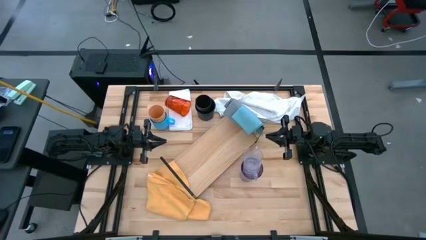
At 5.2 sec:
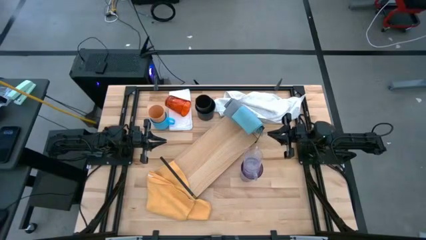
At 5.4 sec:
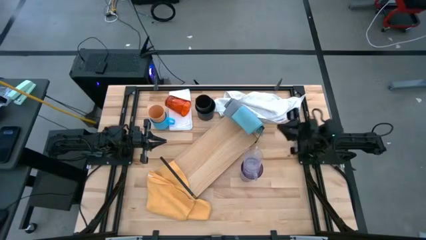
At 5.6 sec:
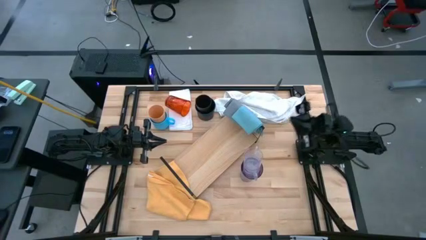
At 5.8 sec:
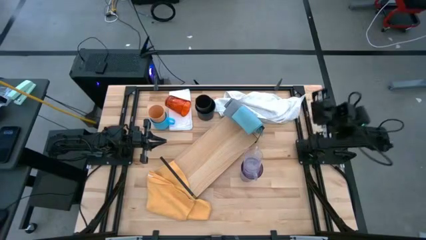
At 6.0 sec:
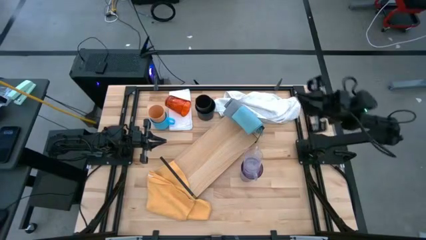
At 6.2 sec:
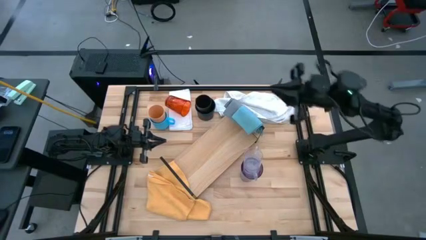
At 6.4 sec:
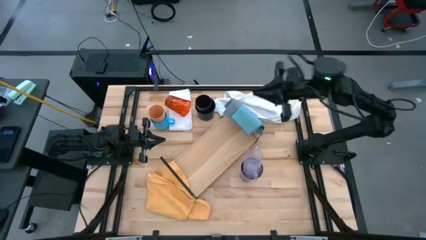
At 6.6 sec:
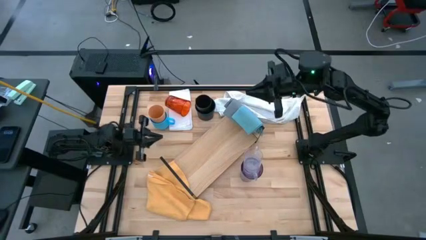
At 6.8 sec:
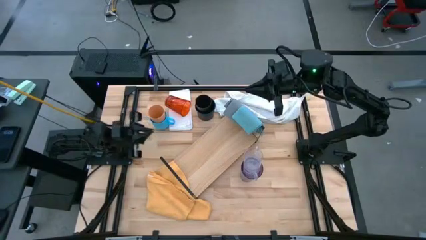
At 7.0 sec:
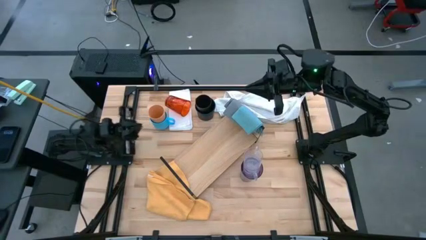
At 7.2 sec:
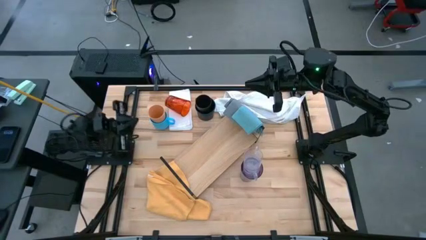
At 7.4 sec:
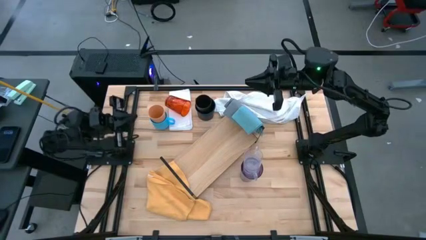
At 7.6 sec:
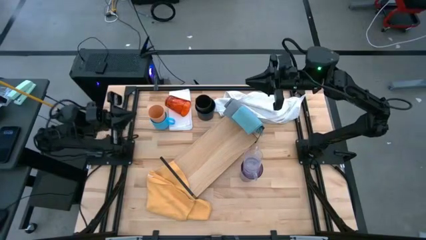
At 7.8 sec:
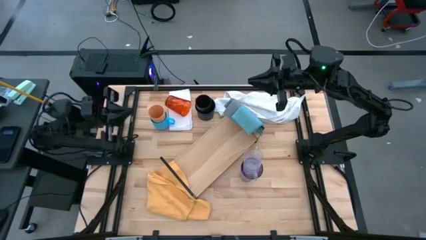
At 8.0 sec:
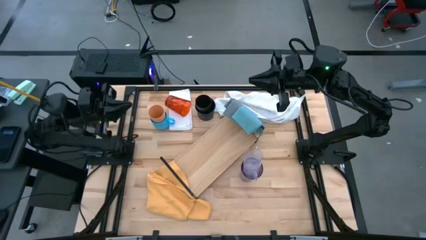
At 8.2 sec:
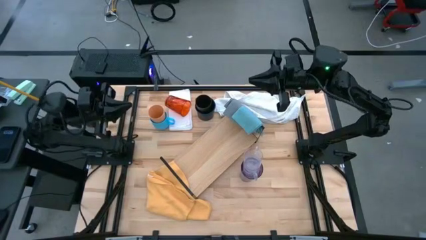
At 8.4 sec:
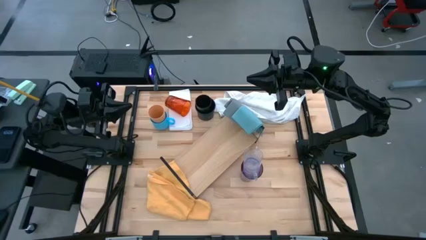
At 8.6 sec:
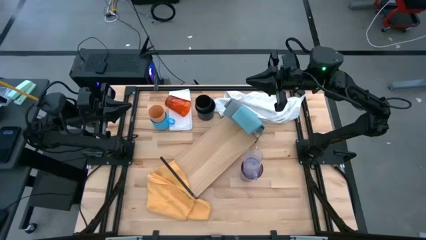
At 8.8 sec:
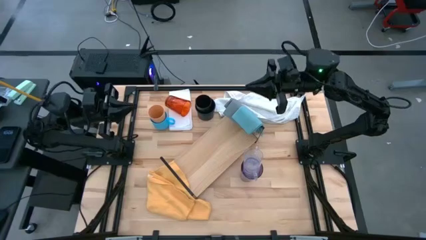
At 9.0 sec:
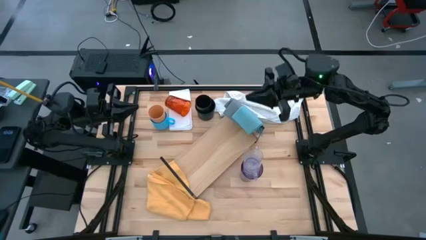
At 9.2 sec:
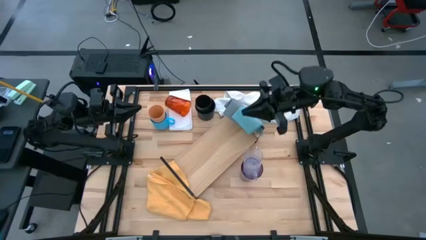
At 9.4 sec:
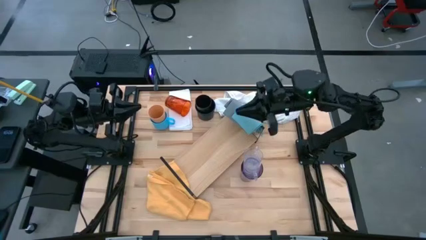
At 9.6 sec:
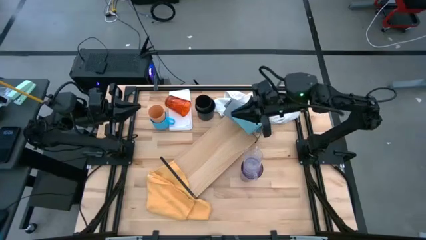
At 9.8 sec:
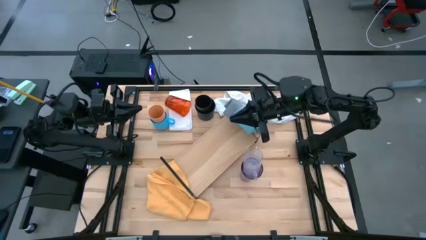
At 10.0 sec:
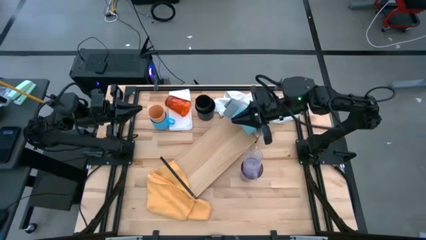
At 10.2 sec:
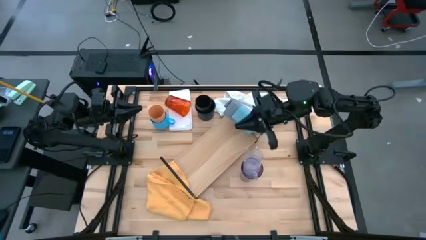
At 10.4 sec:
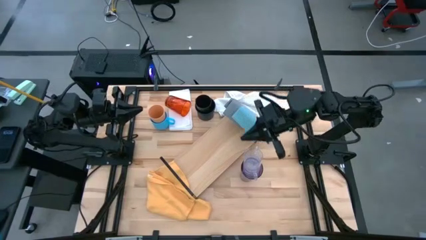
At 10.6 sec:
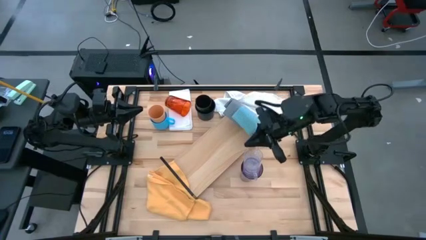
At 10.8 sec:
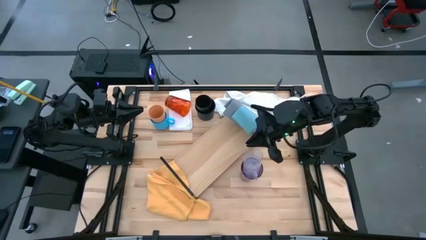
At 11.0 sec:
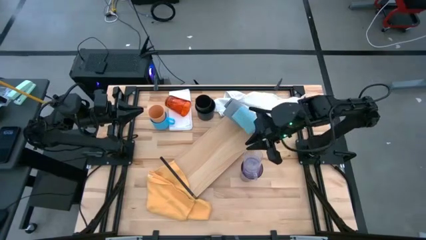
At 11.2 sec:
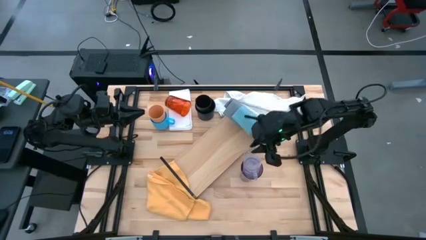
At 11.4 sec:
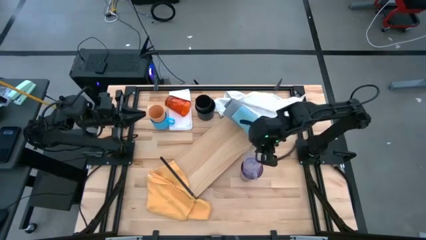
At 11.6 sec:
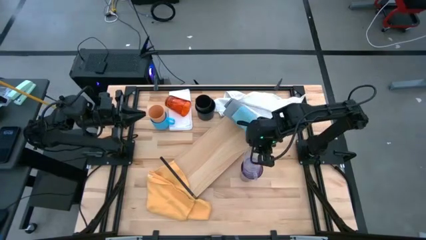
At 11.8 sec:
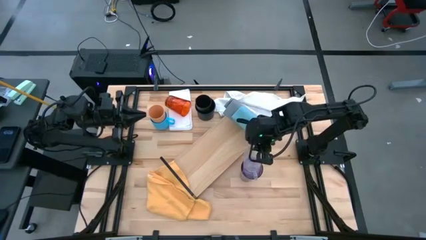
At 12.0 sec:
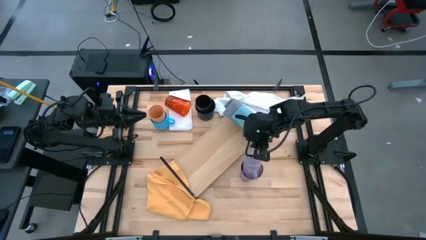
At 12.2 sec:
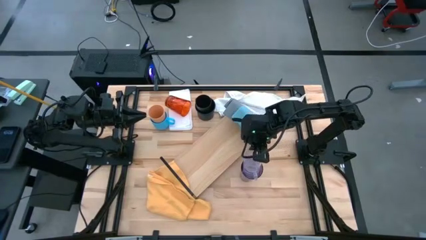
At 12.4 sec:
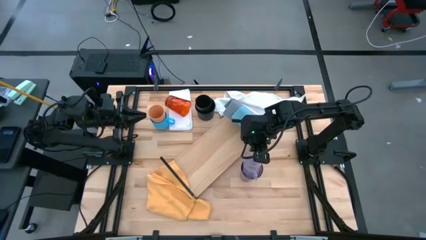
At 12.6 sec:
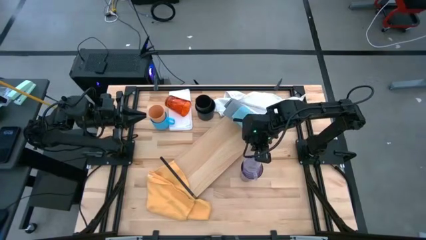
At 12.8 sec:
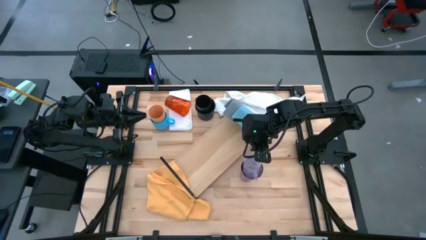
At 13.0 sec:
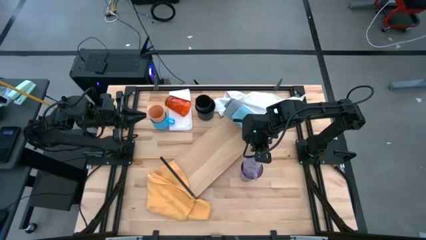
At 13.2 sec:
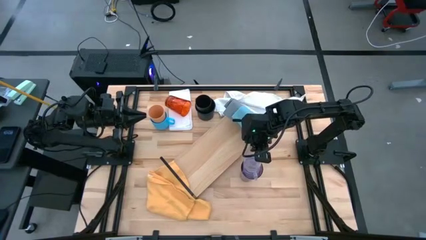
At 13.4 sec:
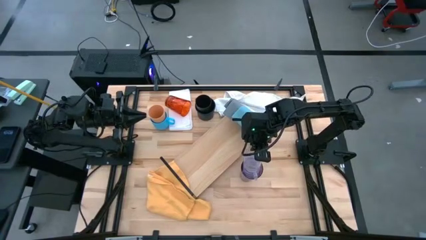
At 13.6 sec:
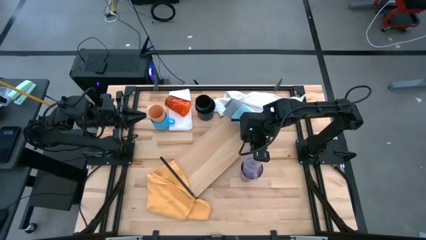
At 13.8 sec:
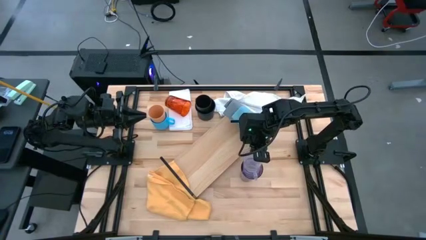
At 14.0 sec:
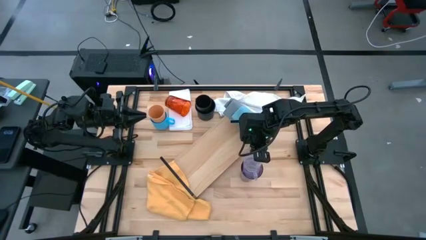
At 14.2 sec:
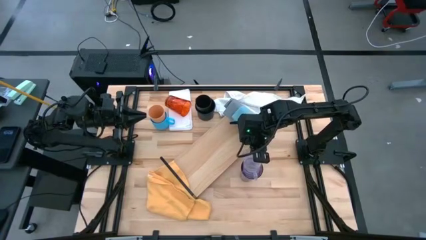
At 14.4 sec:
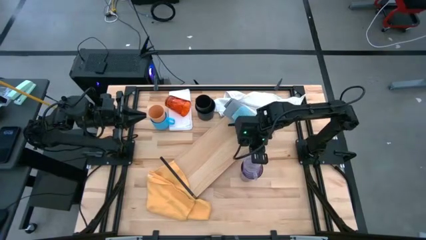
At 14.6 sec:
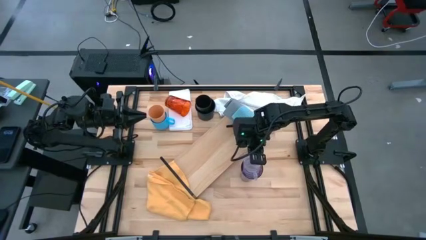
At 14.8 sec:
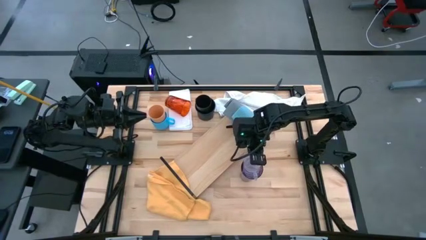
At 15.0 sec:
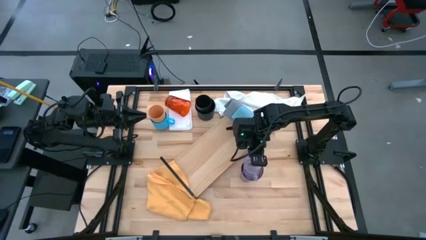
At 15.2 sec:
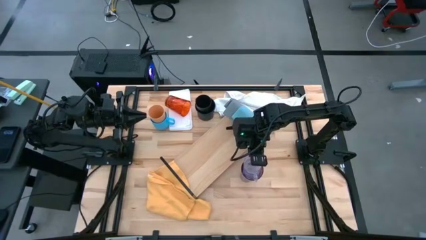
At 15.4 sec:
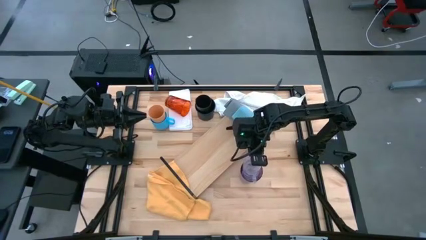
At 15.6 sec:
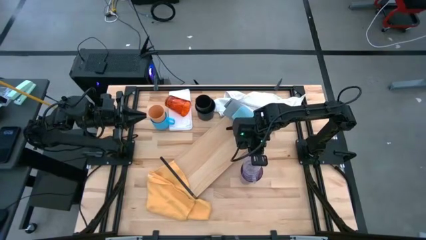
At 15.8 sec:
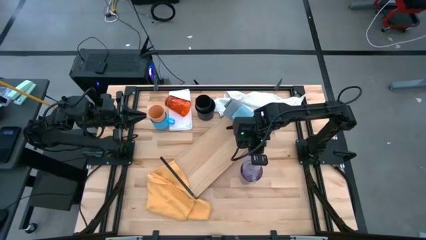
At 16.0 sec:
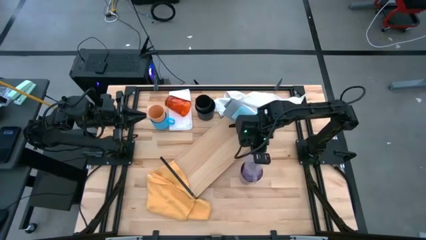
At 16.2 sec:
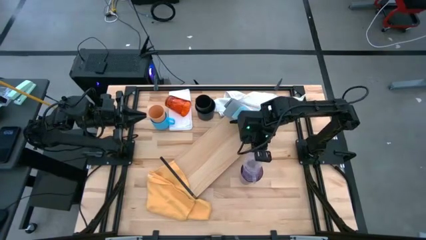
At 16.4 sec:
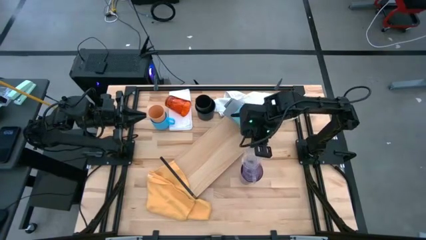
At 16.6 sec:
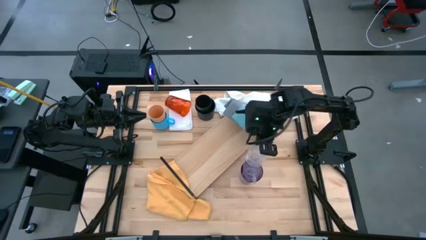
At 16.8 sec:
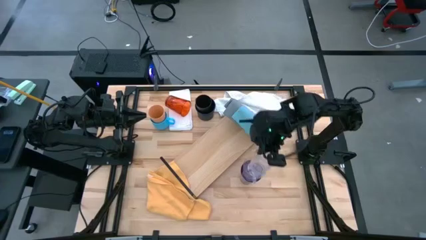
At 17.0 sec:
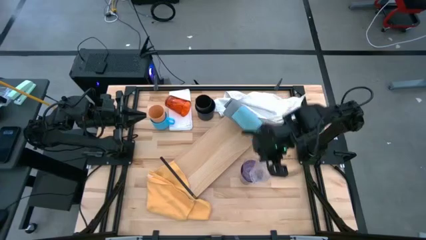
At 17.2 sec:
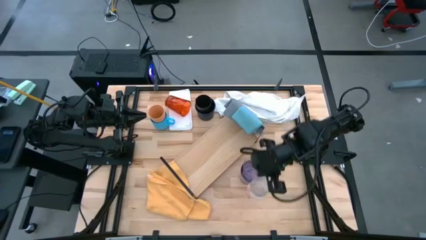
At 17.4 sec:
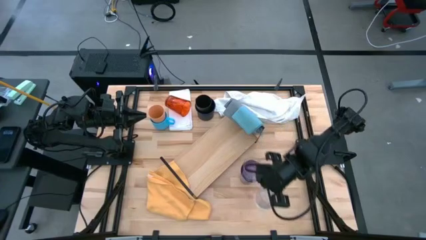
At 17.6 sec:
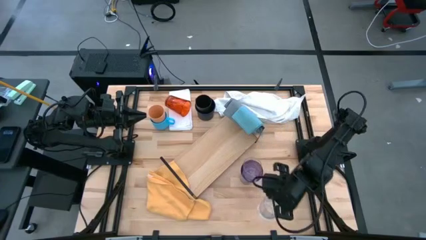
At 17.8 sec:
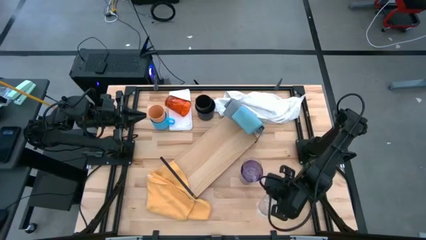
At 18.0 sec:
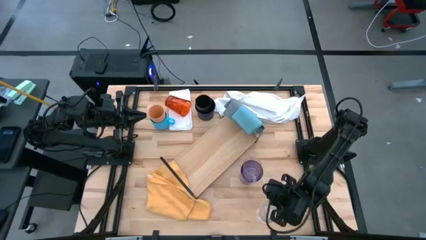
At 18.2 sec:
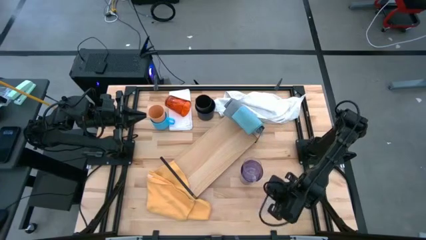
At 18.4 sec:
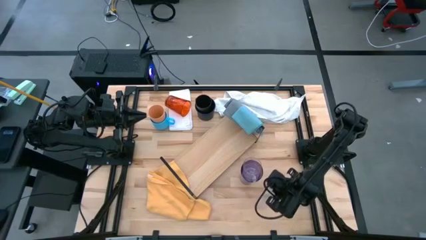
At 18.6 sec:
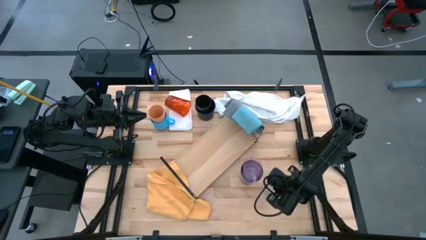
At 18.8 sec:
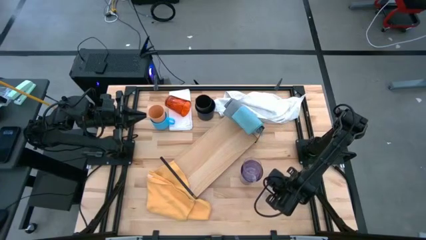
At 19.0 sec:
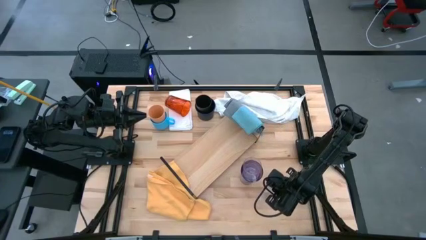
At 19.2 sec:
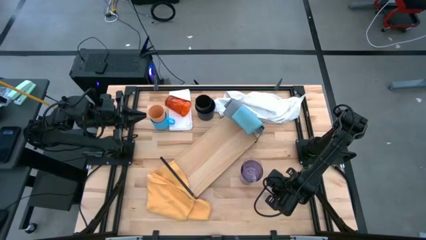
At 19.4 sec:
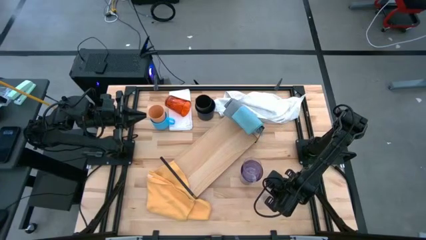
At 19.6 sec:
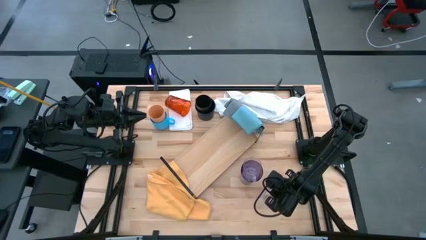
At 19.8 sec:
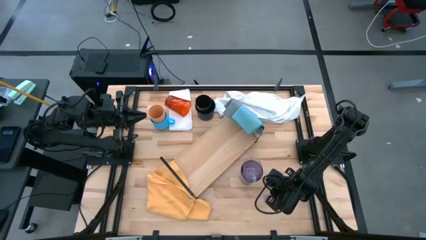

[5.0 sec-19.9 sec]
Task: Stack small to large cups/mugs on shelf
Remove the transparent mug from the transparent mug
